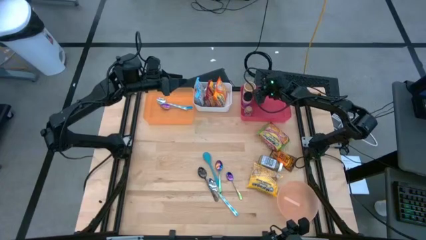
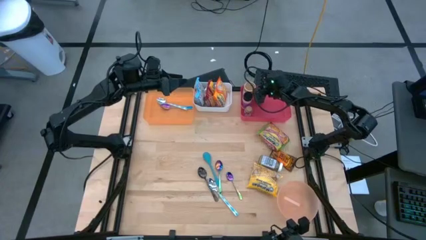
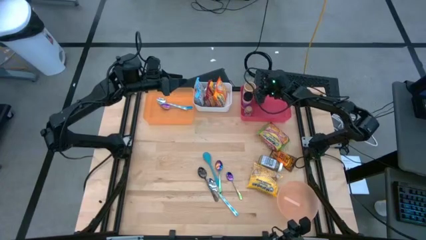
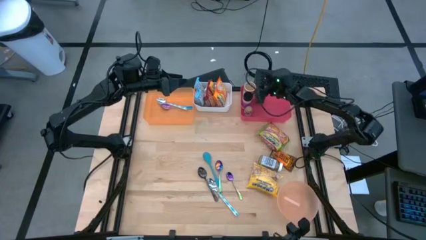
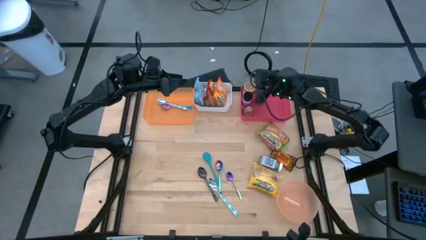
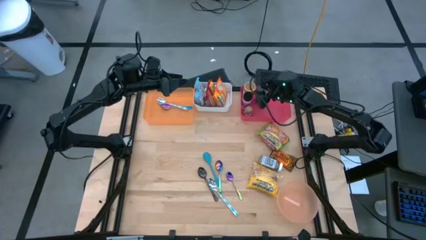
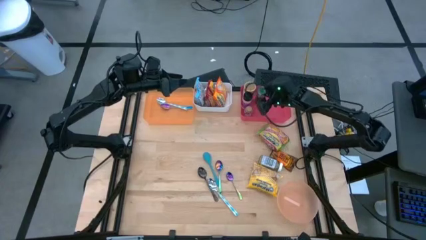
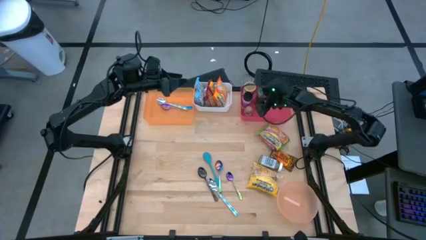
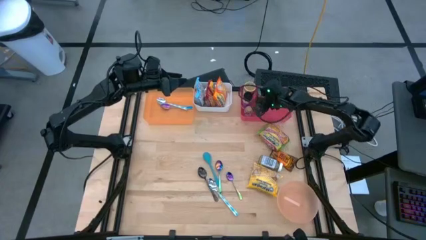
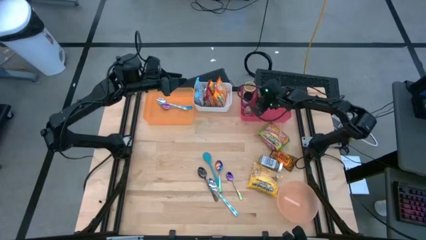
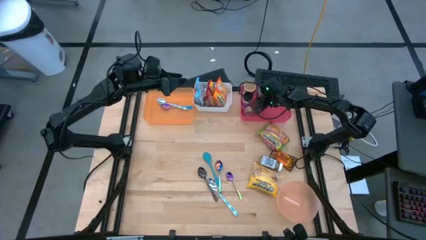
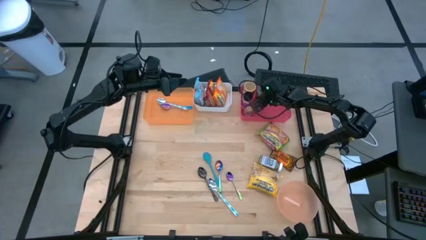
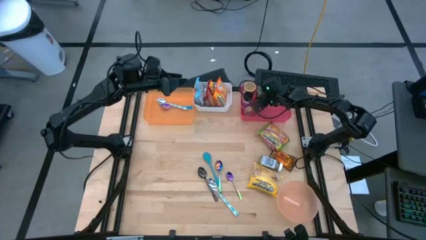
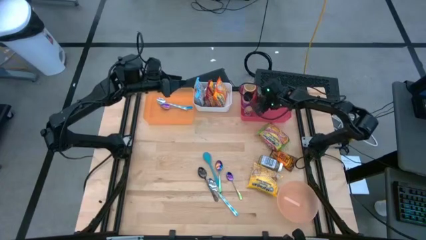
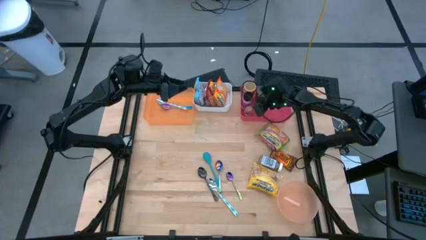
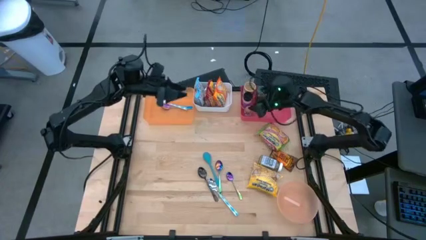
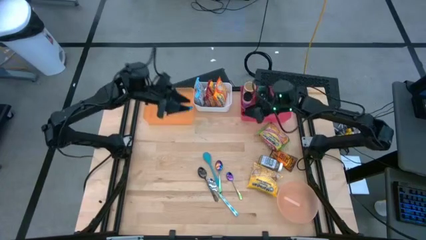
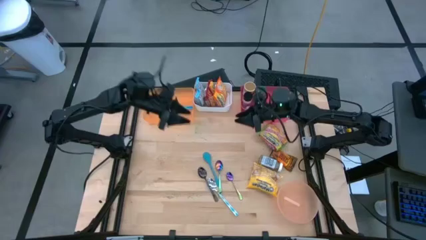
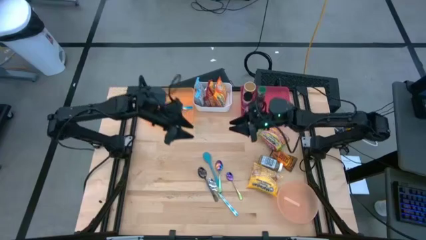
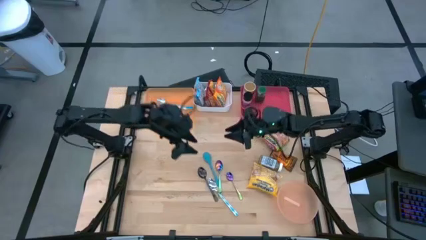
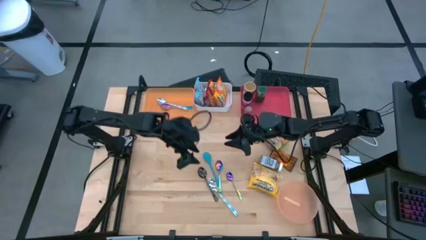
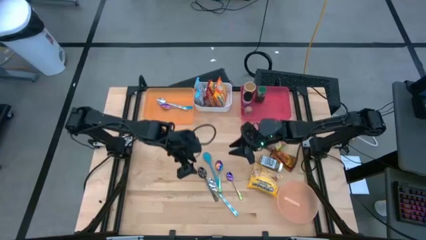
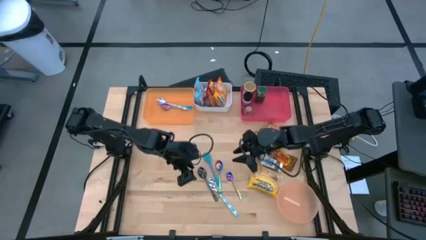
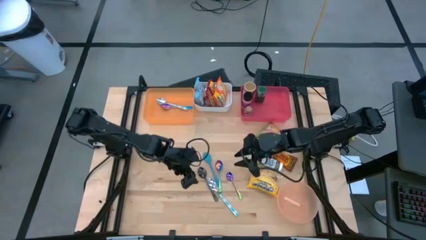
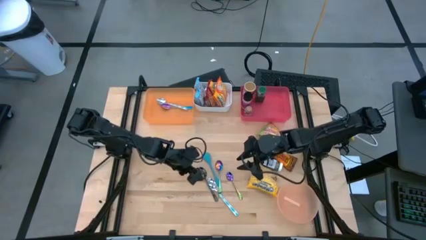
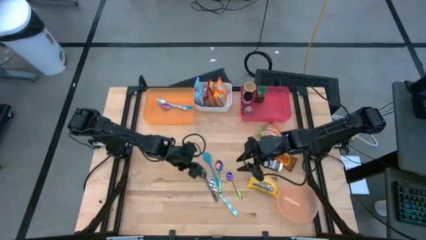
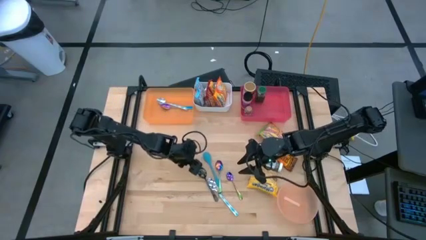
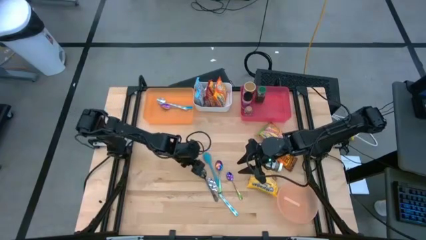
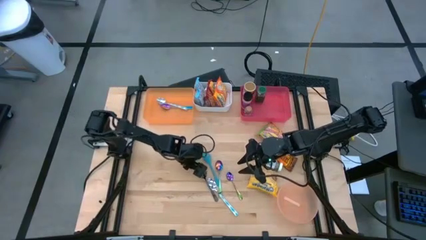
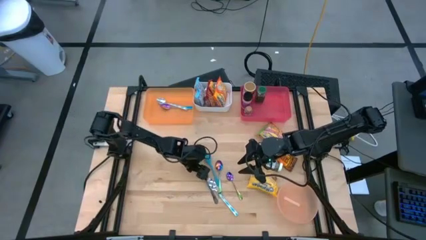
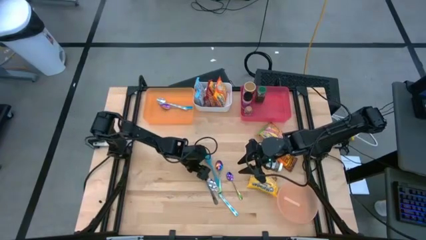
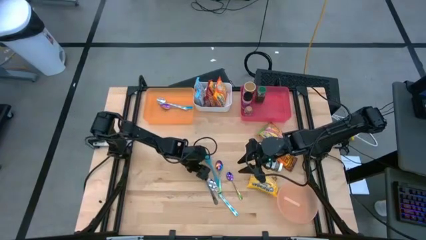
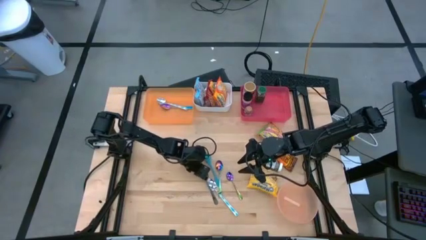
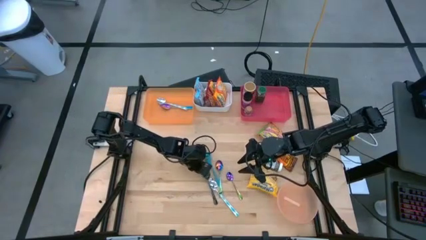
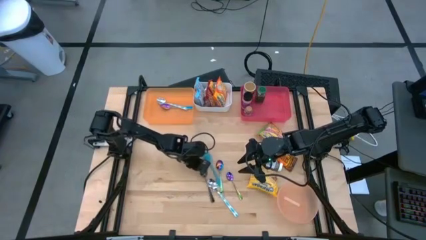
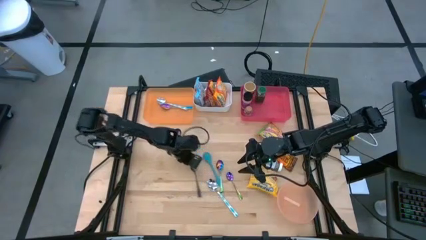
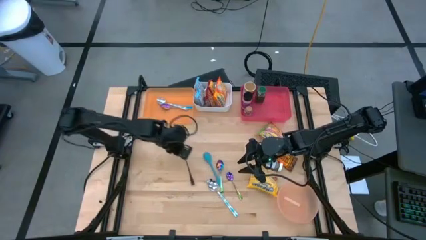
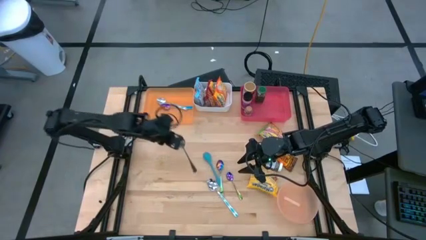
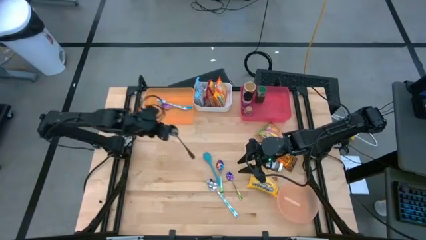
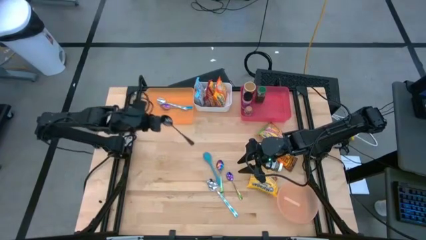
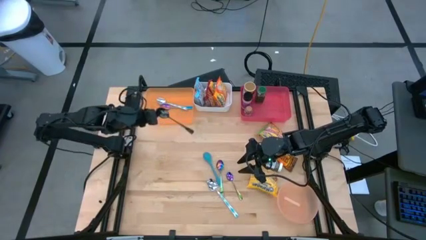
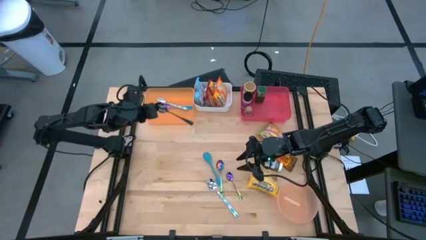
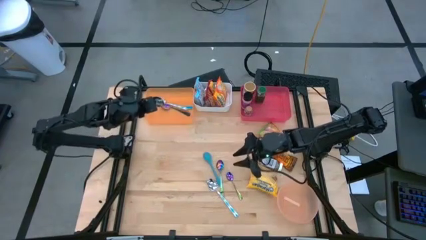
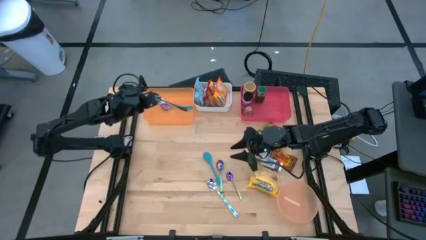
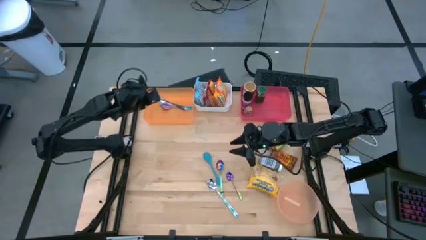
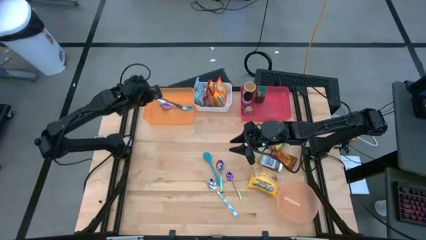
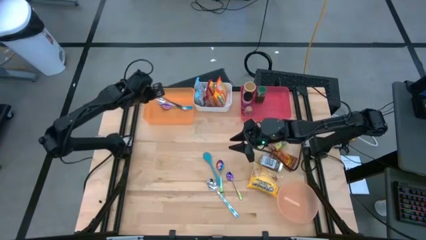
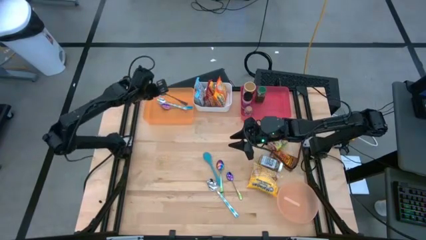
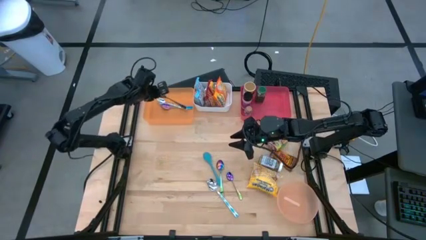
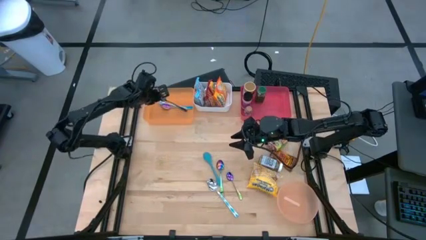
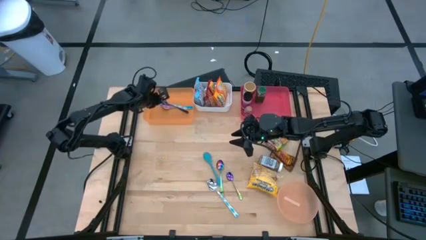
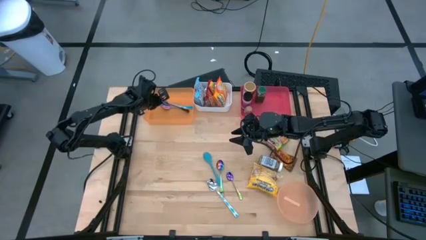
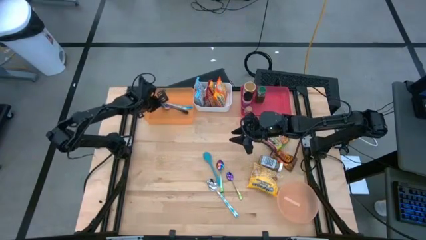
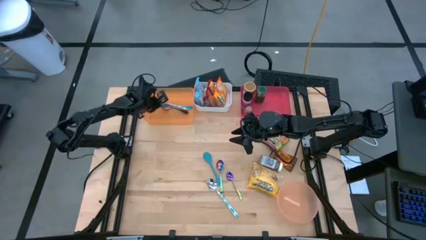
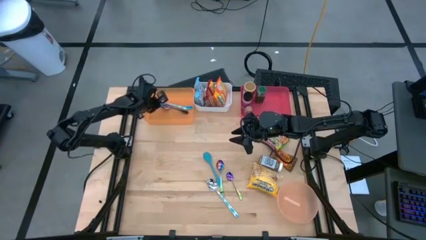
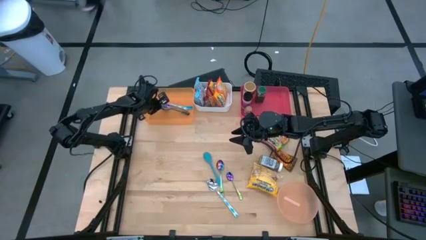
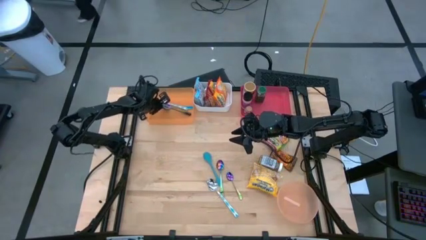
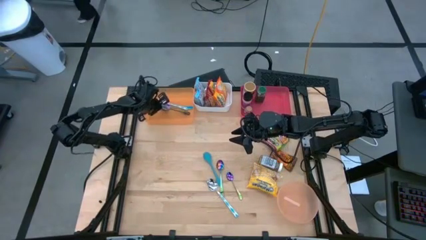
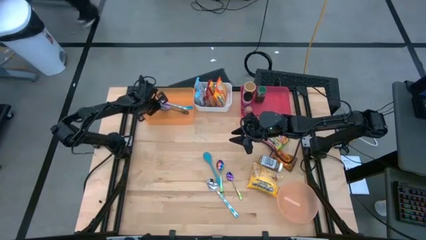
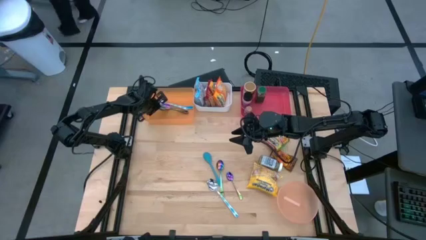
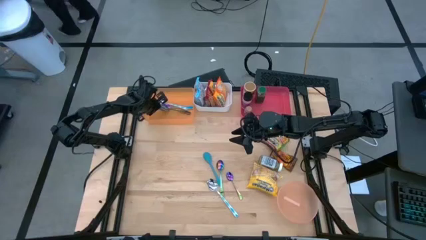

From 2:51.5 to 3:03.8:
Task: Pick & Place Food Item
Put the black spoon into the orange bin
